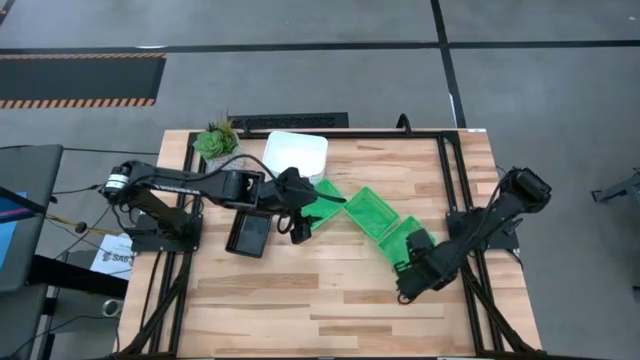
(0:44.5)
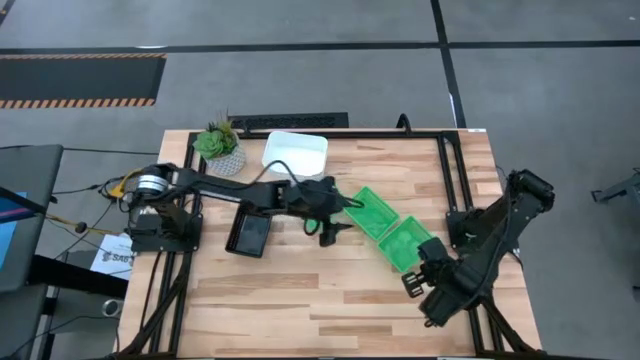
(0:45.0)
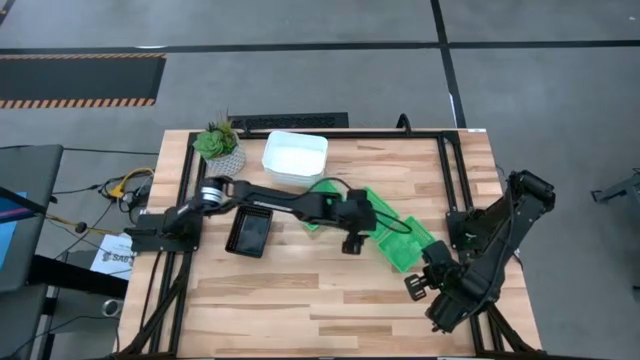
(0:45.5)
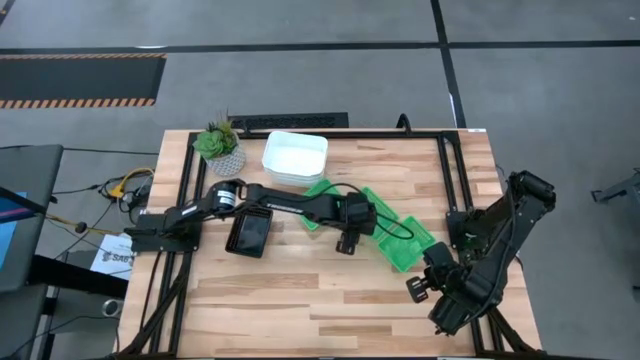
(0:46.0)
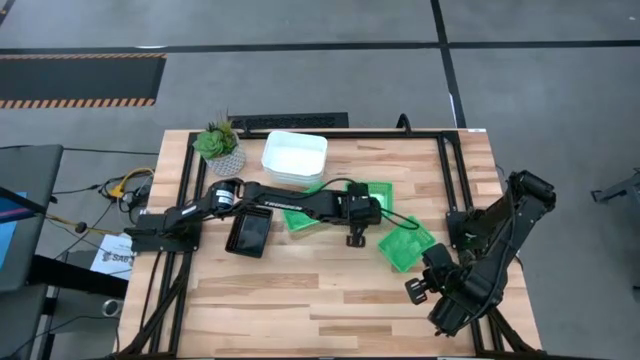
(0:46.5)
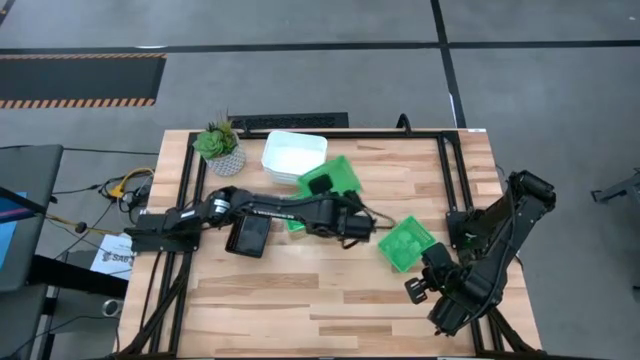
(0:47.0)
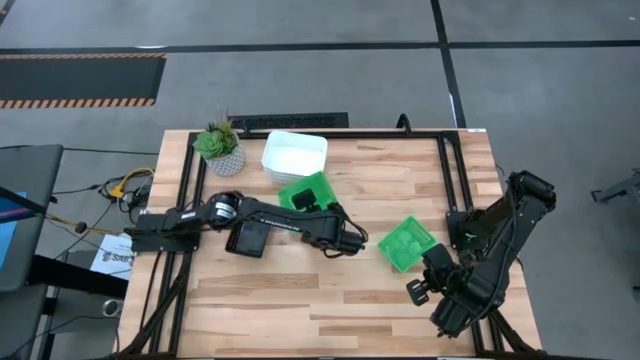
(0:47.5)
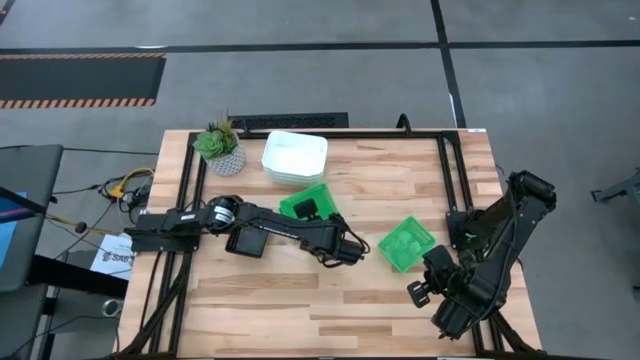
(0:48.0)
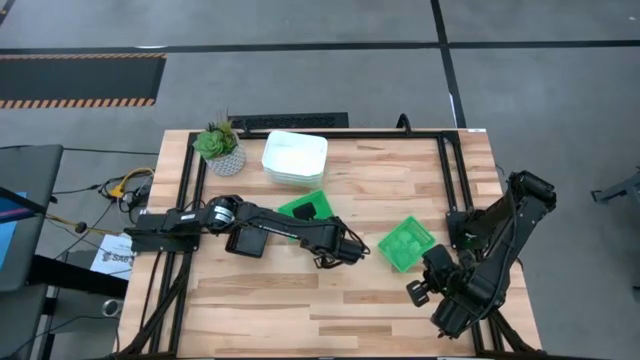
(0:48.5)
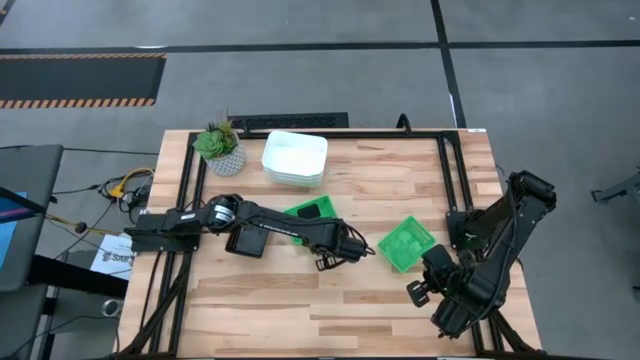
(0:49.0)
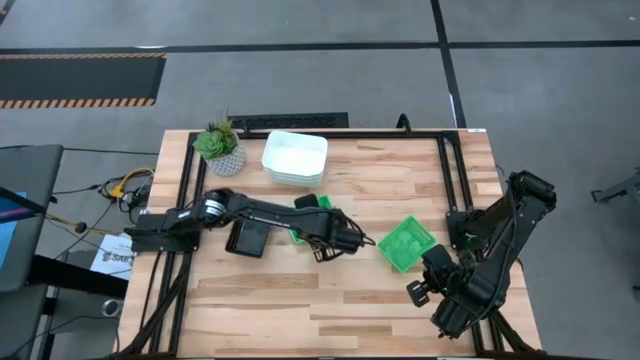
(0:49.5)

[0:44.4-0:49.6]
Stack the middle green bin on top of the left green bin

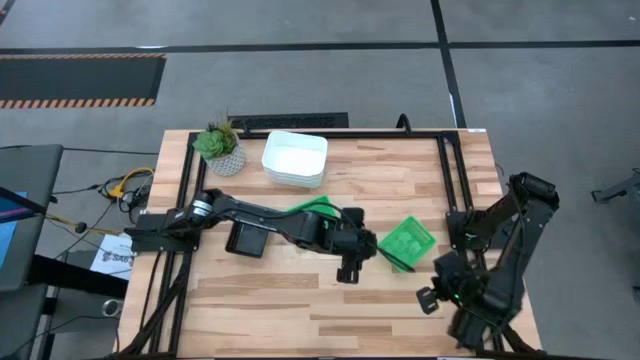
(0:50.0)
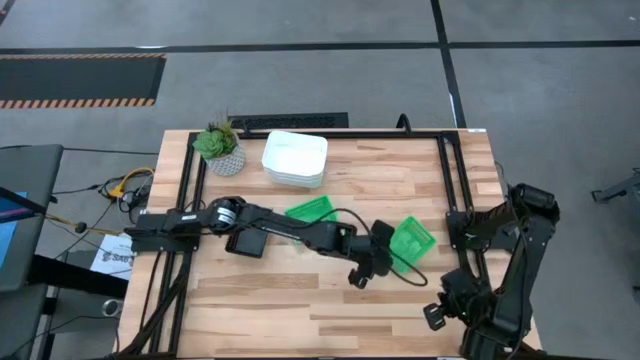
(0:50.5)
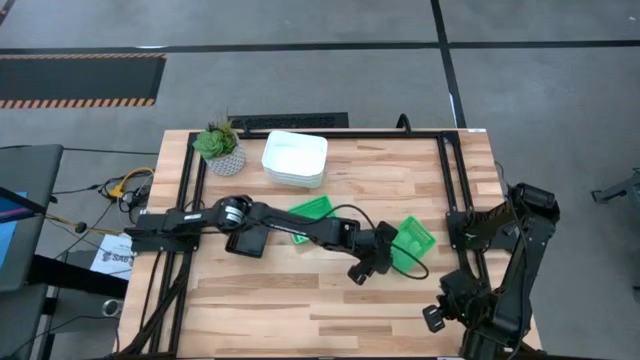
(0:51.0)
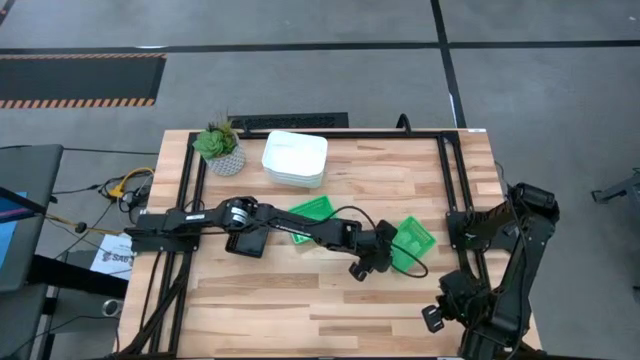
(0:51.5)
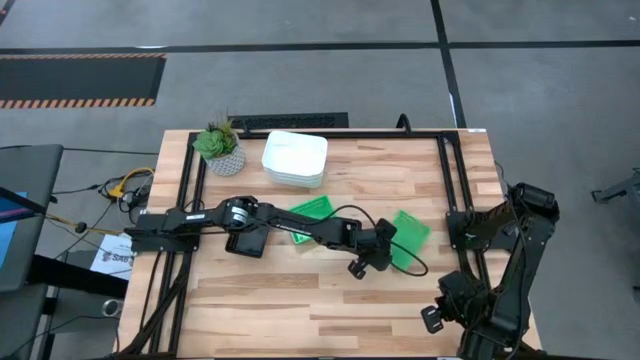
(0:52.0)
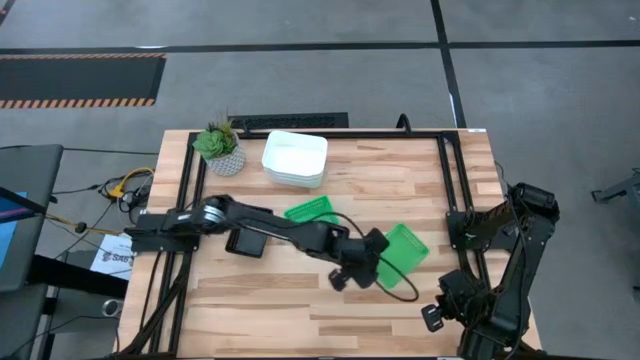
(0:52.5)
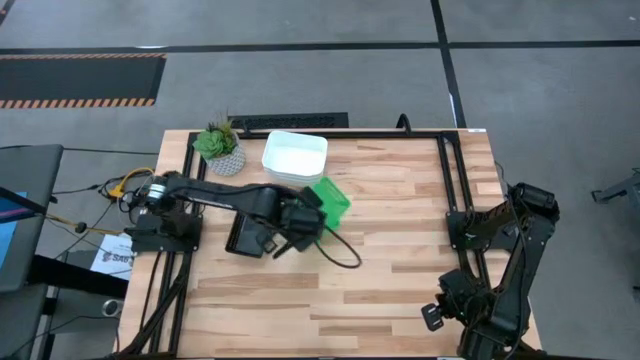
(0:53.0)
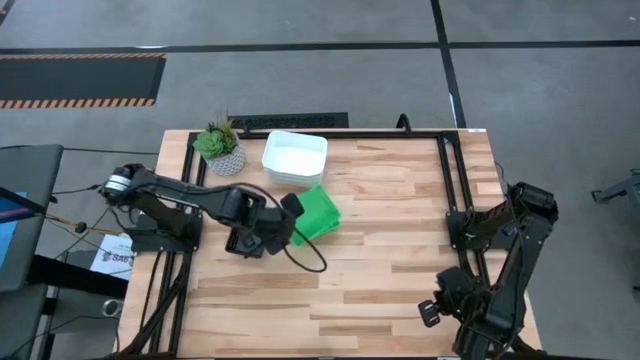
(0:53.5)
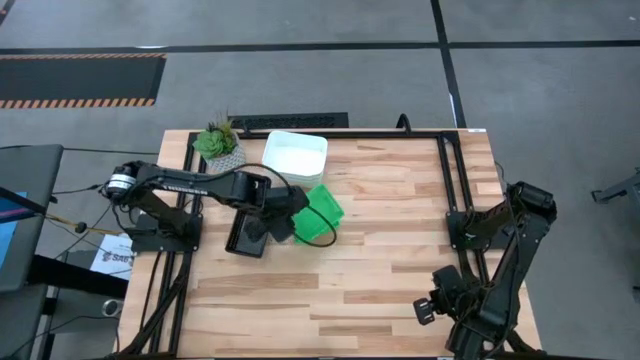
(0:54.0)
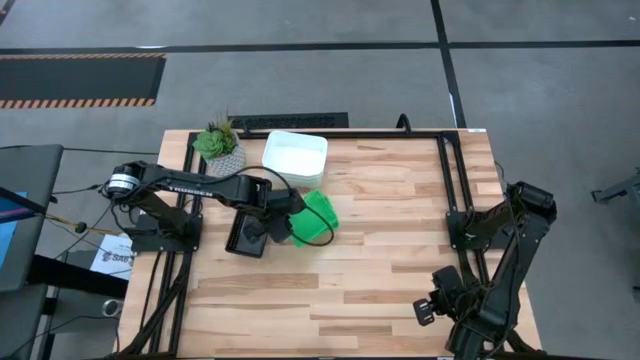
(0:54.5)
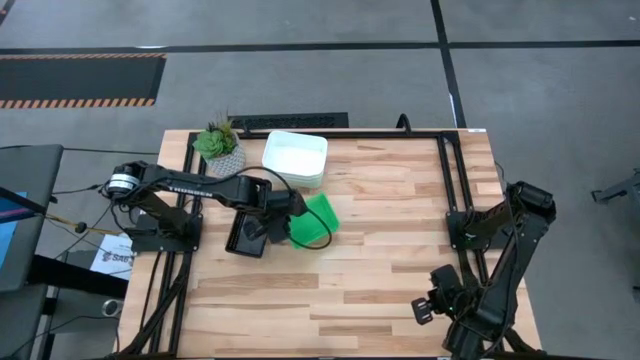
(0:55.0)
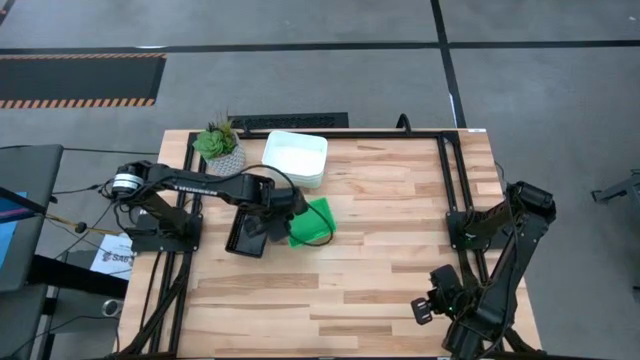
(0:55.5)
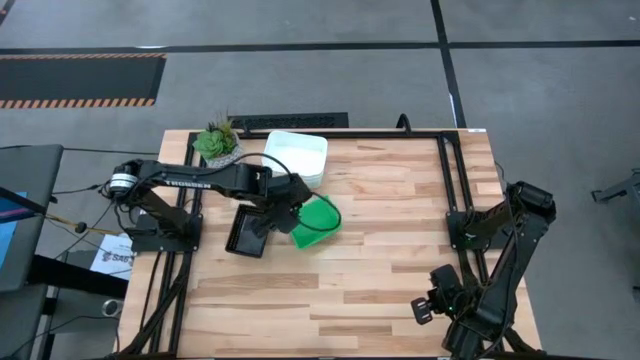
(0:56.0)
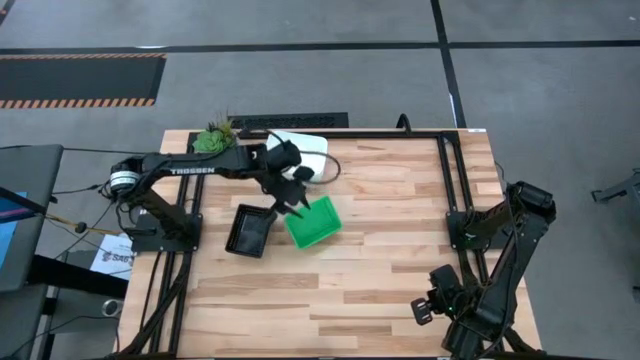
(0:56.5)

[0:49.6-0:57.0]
Stack the right green bin on top of the green bins

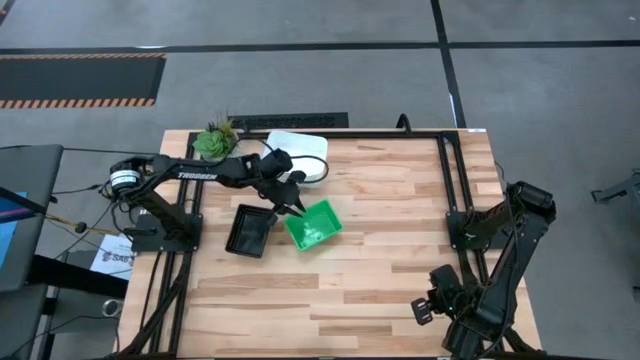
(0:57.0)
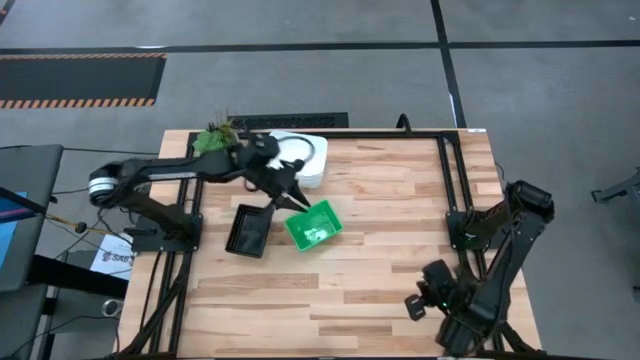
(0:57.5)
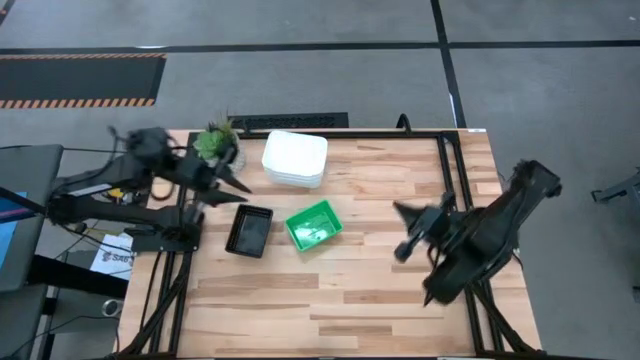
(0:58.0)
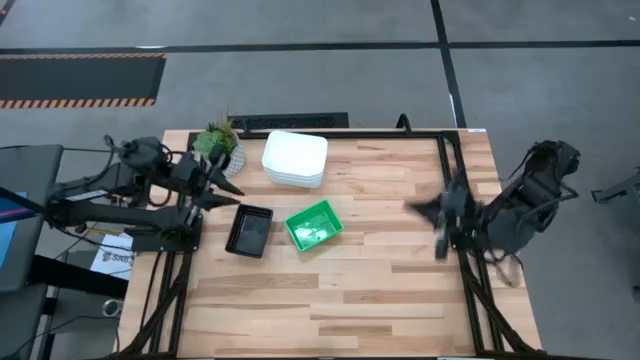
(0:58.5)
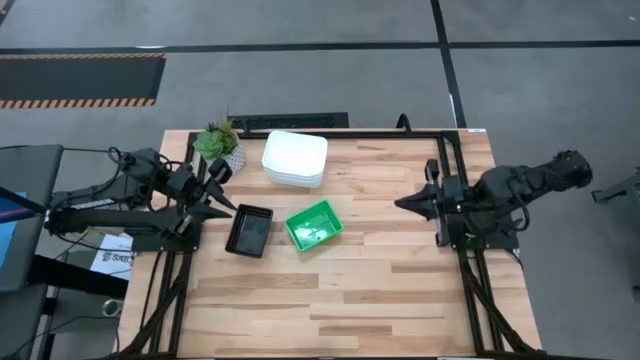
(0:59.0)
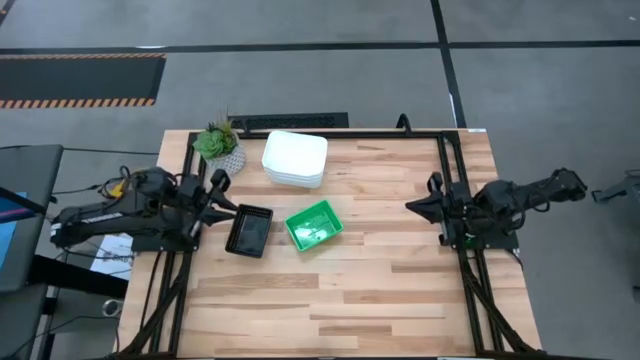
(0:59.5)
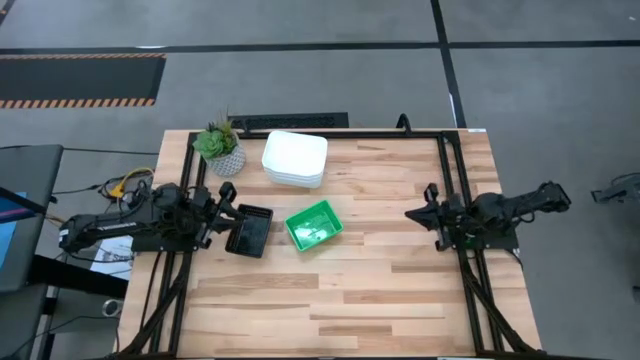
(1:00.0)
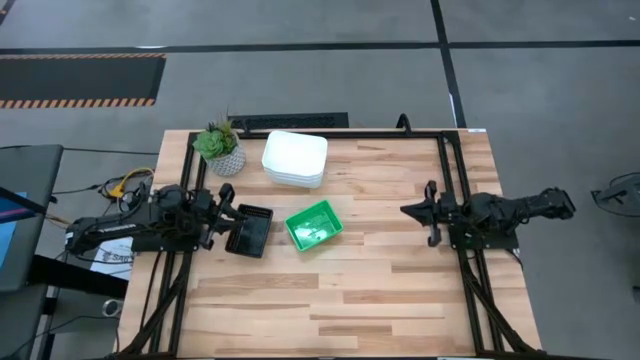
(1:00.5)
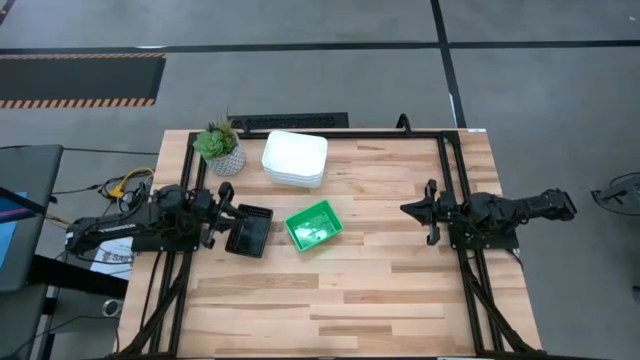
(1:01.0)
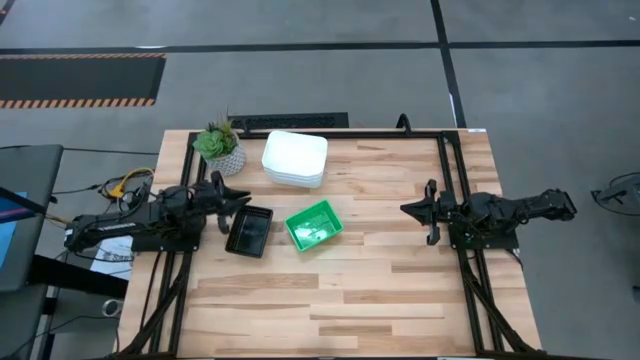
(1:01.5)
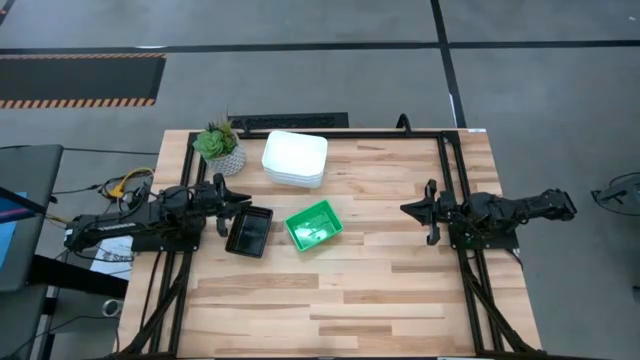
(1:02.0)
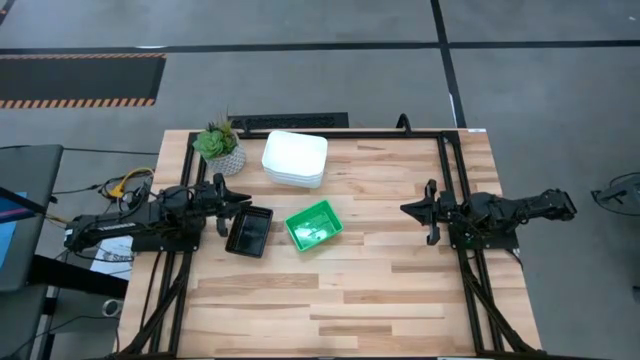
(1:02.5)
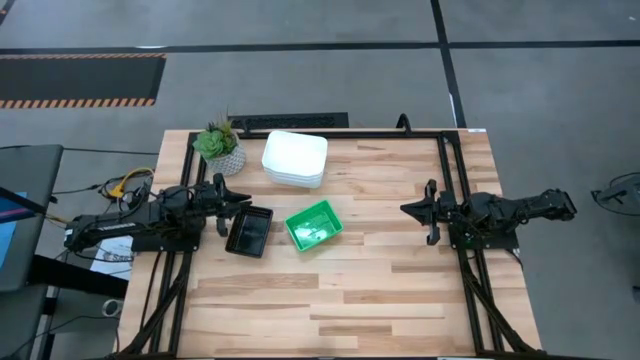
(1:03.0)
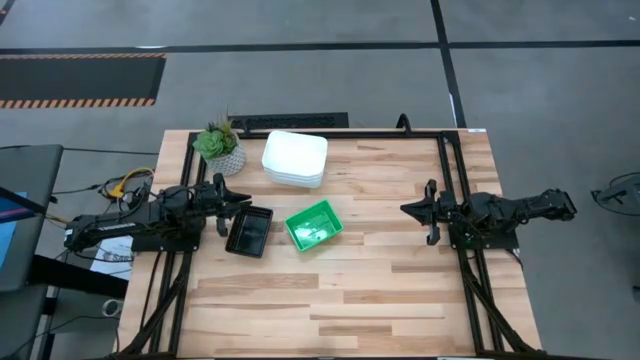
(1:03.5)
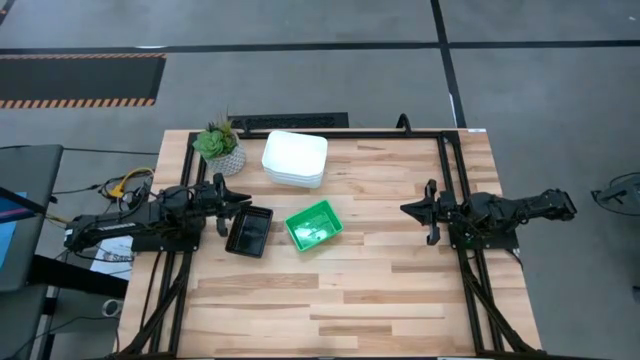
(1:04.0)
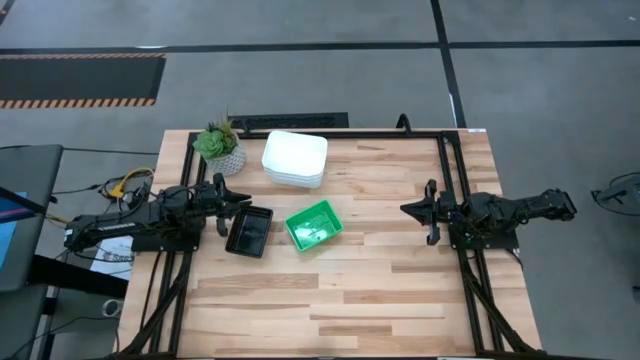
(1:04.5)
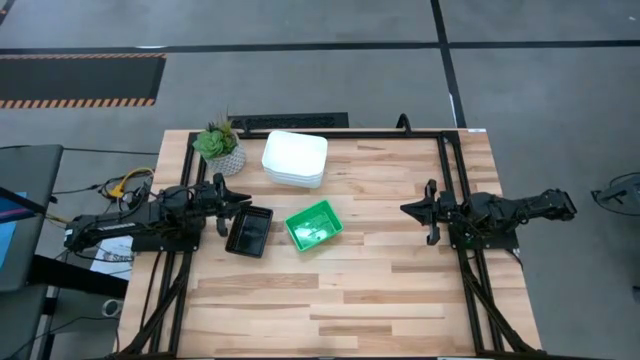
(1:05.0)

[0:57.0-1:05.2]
Return to Home Position
